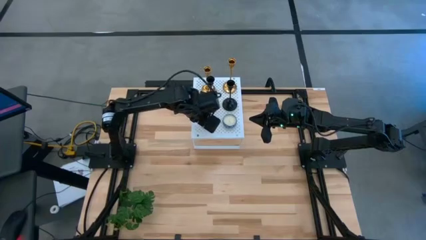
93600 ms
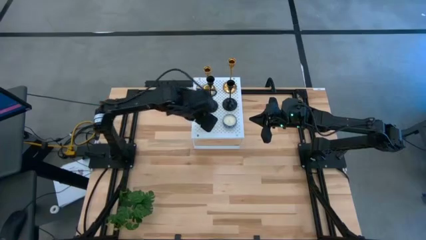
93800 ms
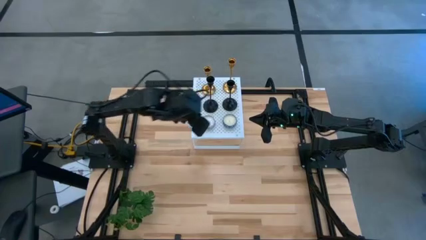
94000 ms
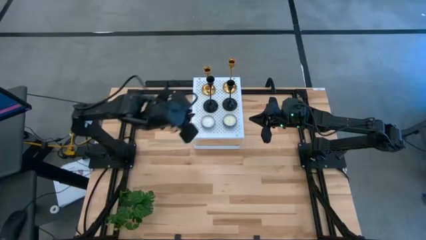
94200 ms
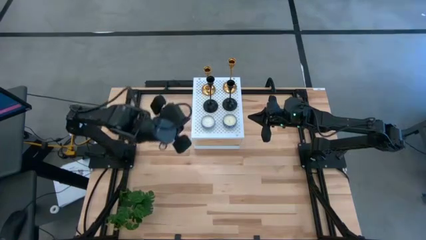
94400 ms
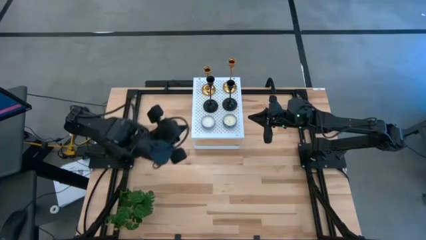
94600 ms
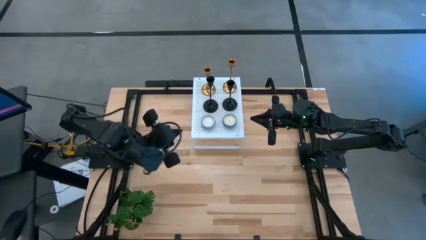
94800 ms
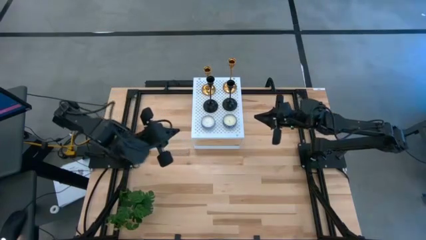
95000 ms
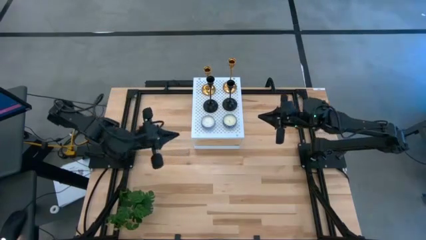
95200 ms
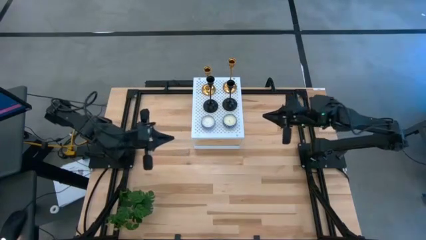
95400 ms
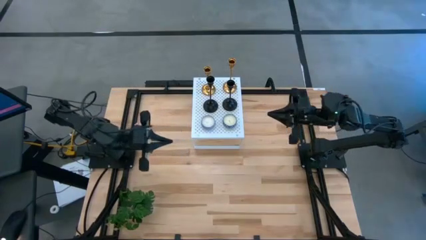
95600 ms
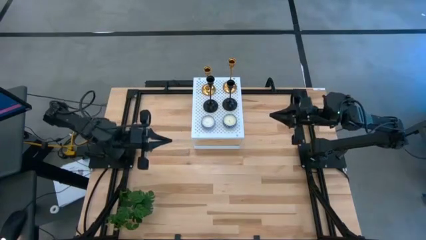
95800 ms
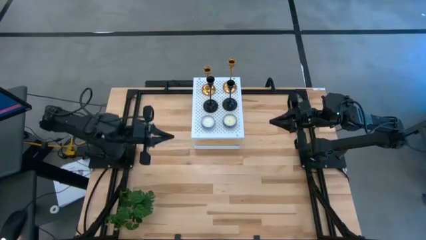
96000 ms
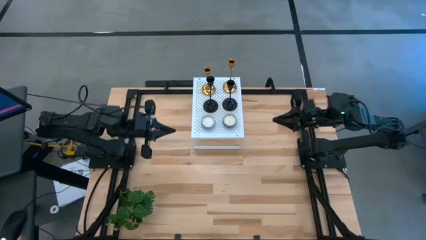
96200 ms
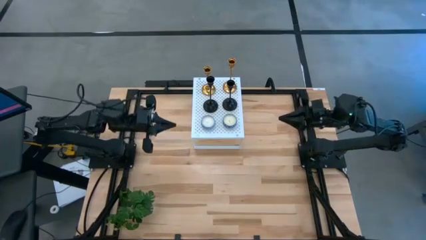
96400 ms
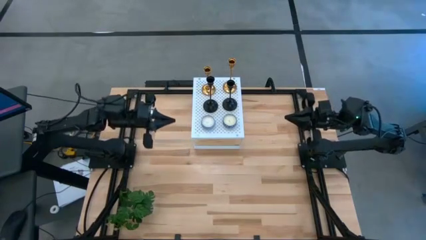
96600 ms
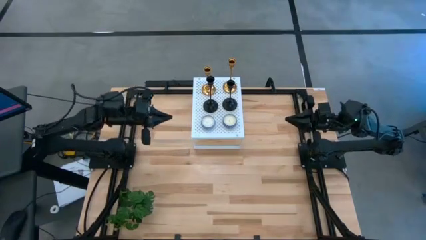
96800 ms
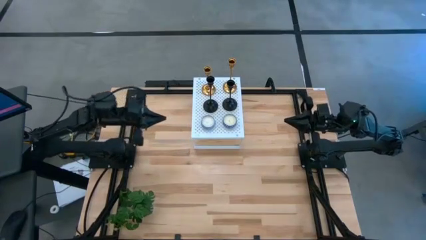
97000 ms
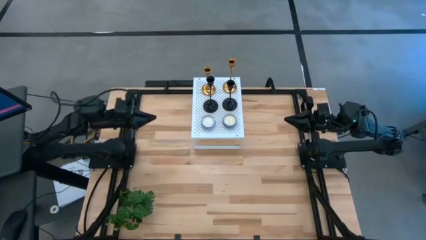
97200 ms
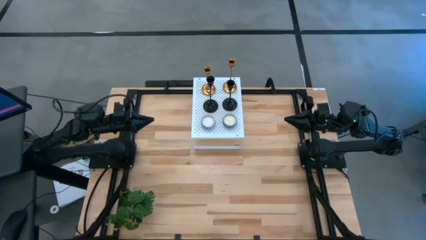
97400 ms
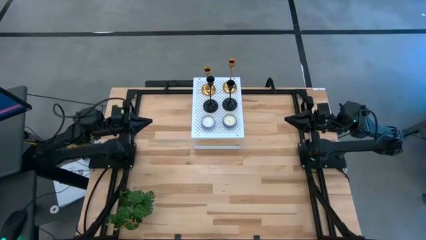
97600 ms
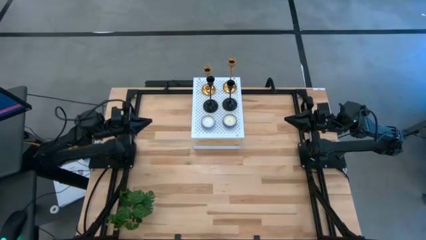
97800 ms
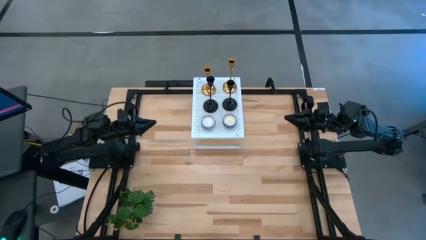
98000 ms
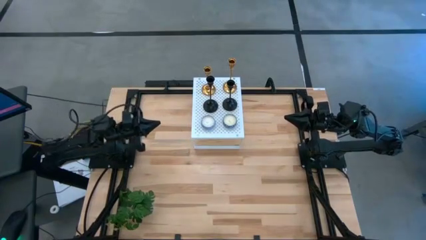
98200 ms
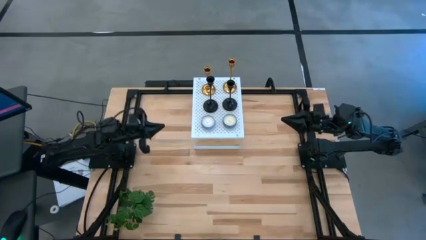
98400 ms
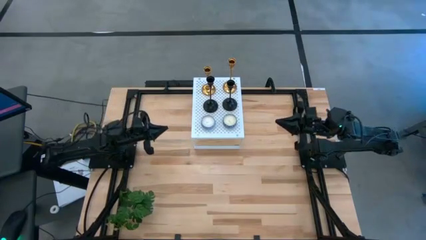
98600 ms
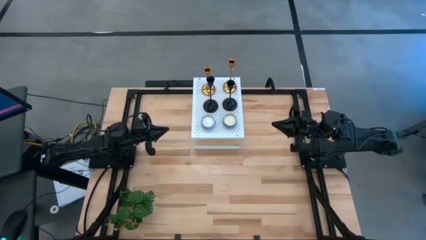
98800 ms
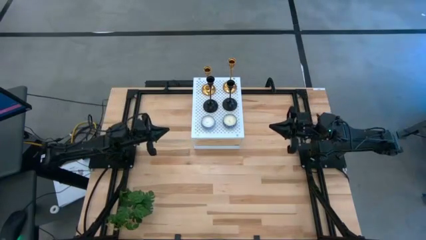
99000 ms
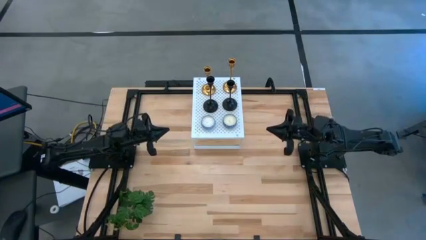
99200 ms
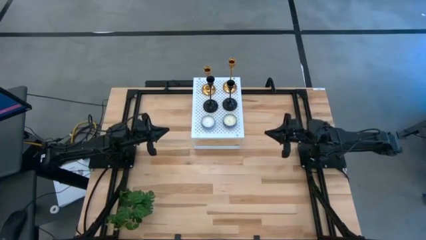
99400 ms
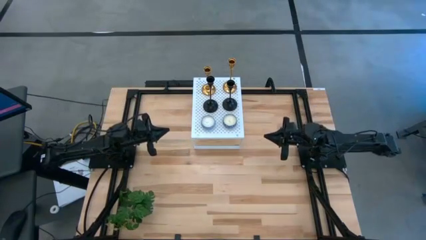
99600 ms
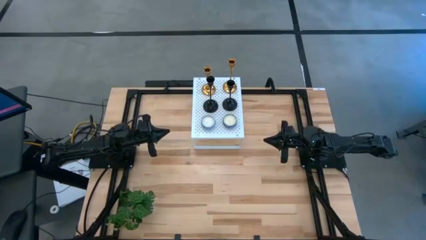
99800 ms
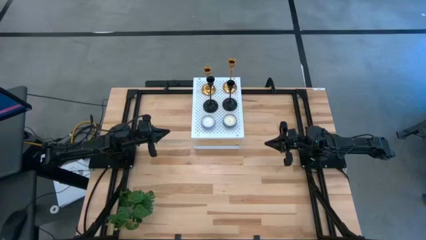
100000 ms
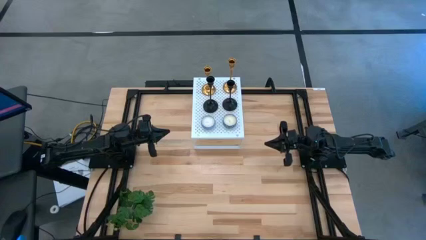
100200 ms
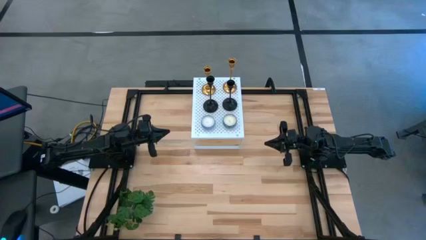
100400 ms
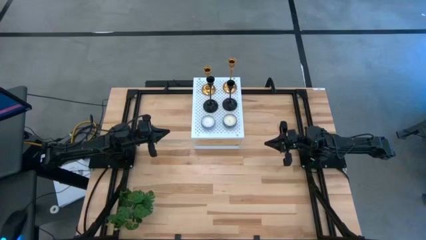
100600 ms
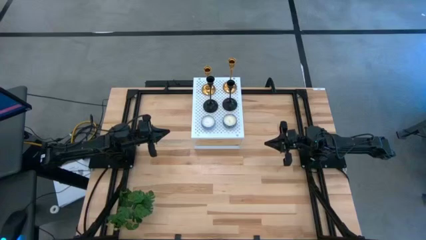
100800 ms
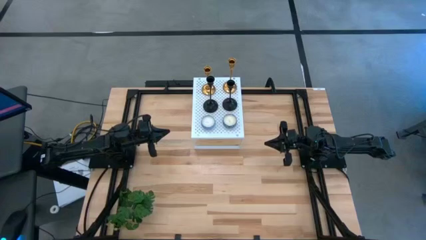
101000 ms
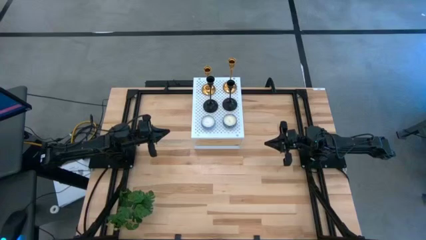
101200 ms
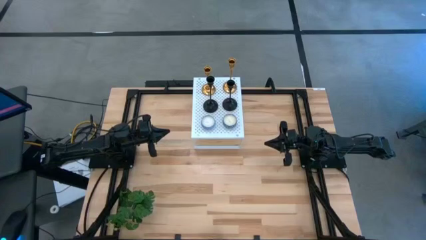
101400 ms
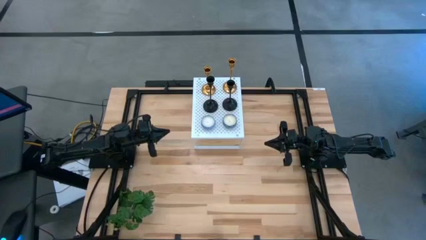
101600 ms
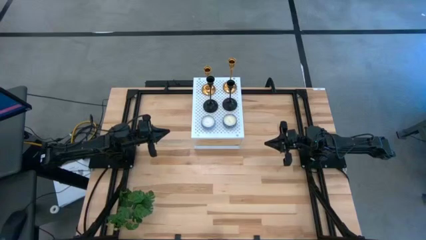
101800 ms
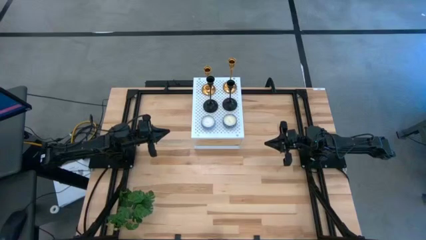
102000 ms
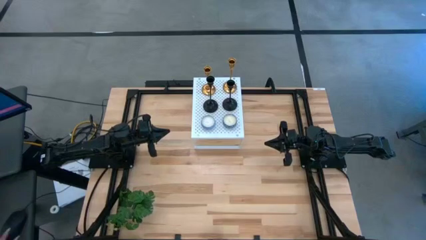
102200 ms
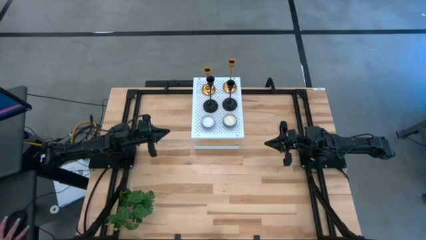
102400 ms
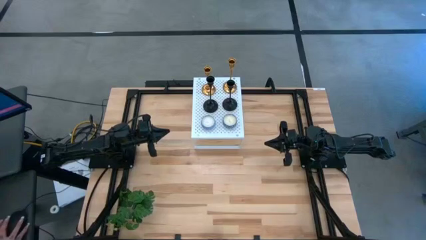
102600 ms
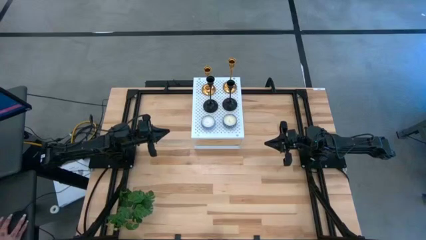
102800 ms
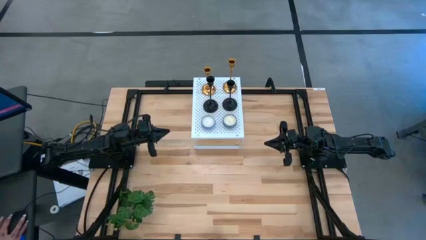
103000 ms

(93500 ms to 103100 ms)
Task: Pick & Place candle stick holders
Return to Home Position

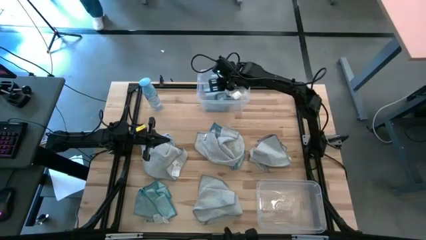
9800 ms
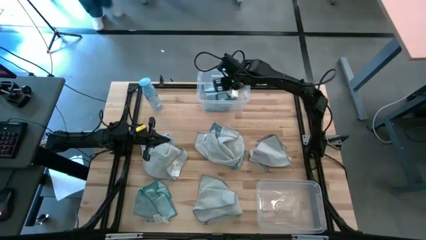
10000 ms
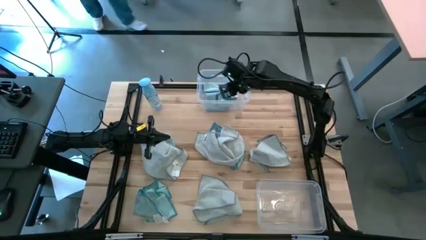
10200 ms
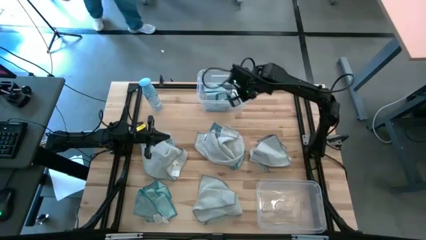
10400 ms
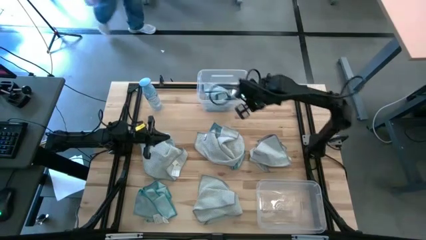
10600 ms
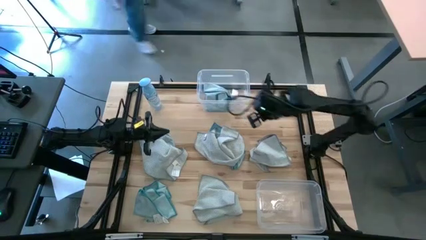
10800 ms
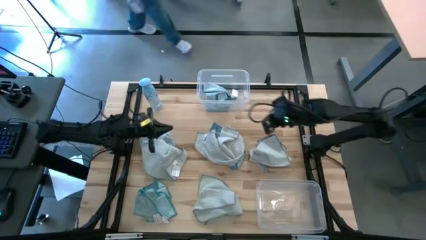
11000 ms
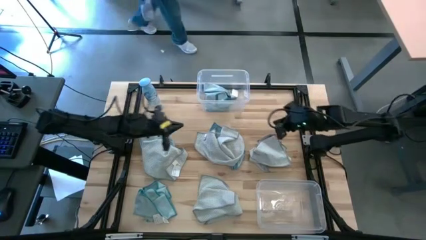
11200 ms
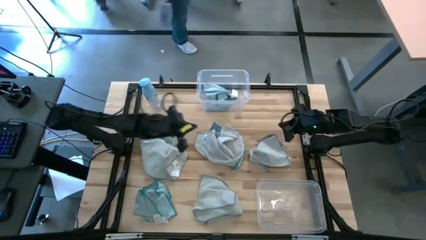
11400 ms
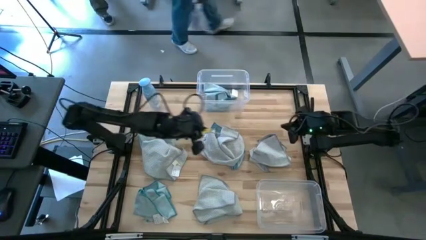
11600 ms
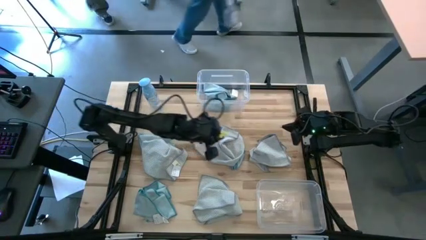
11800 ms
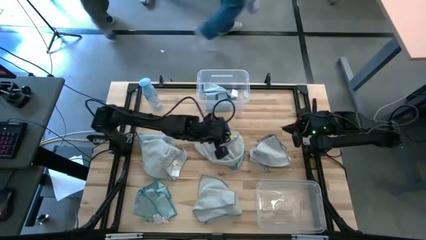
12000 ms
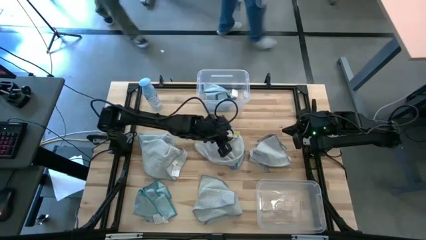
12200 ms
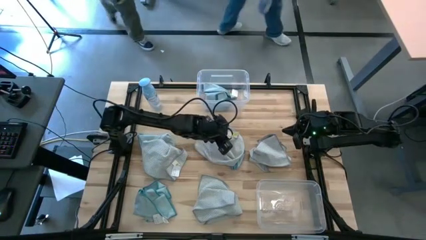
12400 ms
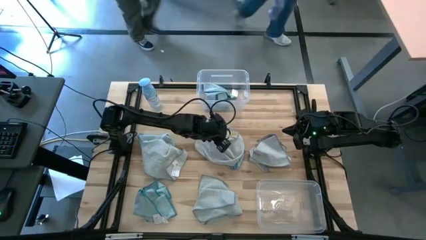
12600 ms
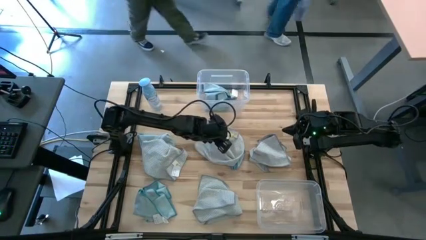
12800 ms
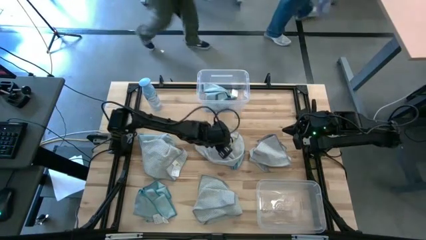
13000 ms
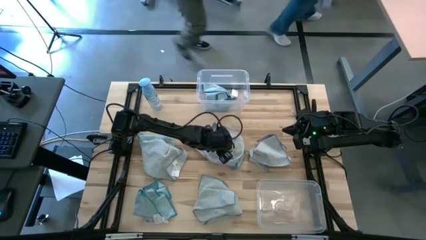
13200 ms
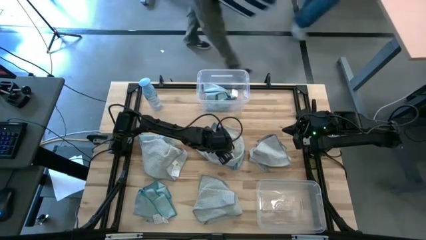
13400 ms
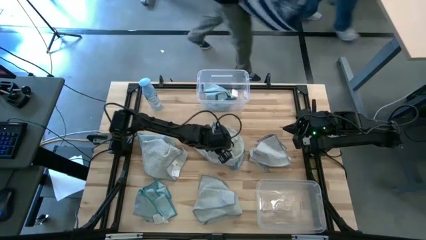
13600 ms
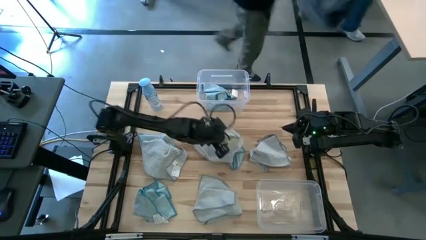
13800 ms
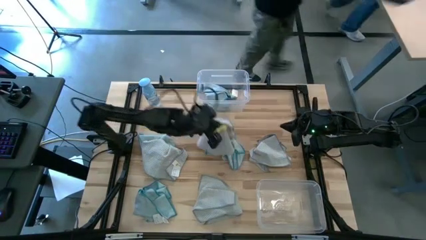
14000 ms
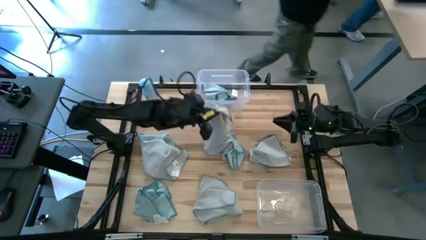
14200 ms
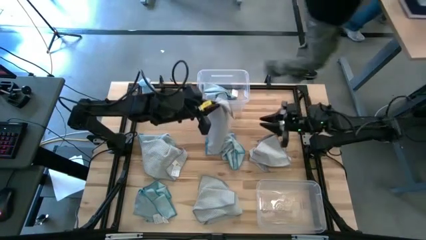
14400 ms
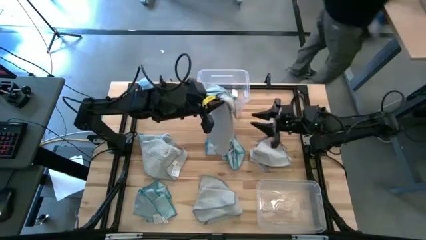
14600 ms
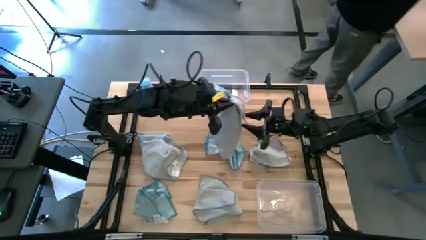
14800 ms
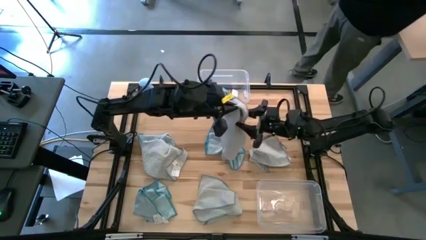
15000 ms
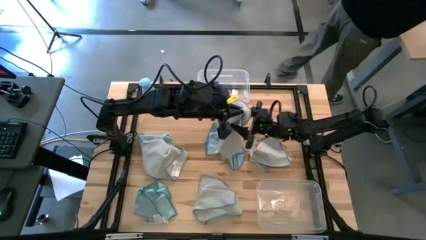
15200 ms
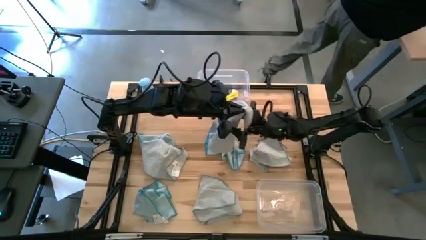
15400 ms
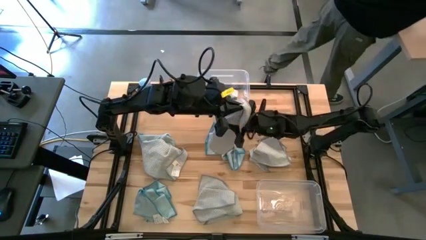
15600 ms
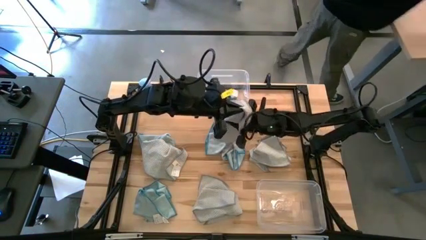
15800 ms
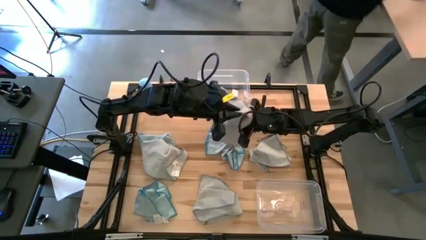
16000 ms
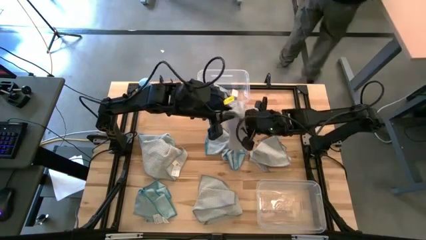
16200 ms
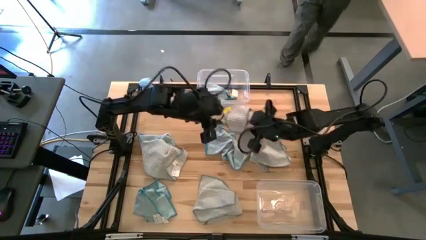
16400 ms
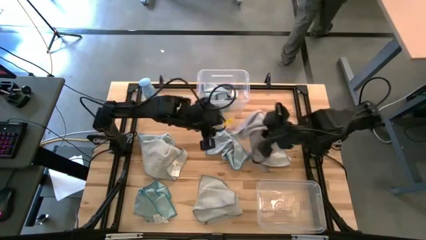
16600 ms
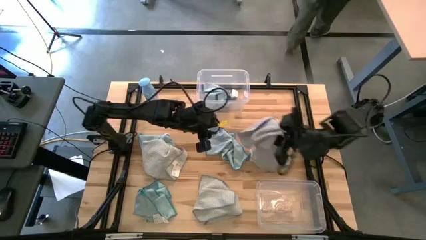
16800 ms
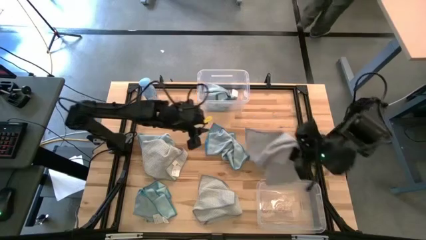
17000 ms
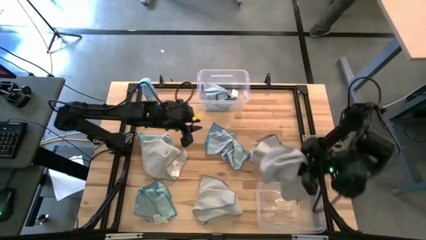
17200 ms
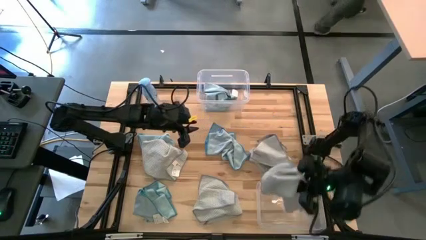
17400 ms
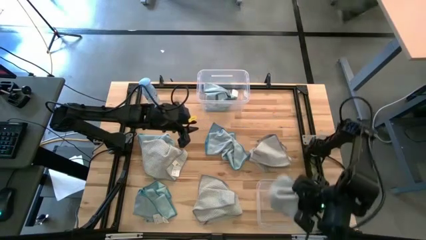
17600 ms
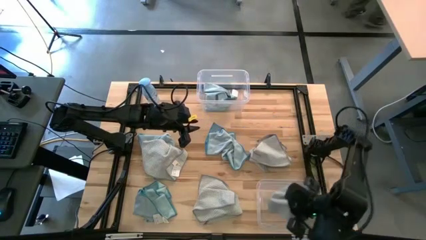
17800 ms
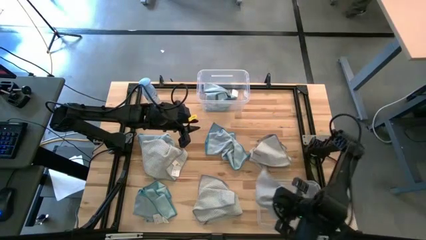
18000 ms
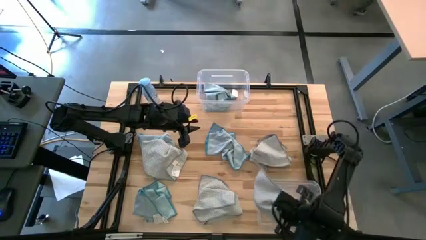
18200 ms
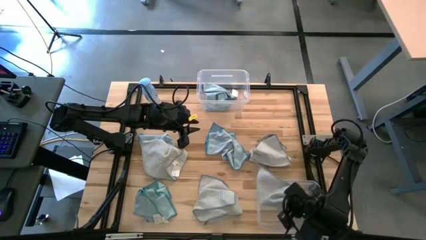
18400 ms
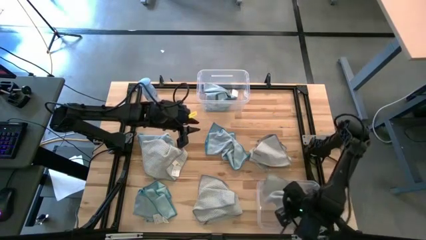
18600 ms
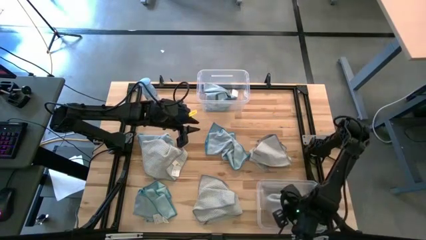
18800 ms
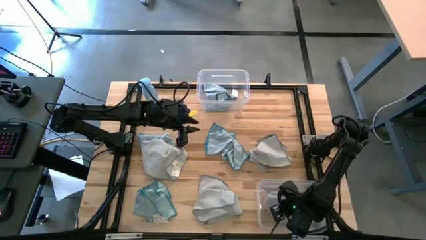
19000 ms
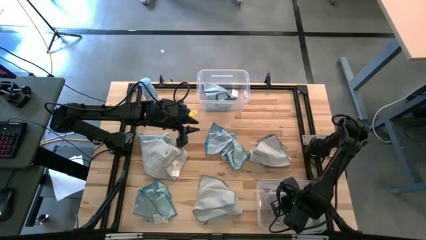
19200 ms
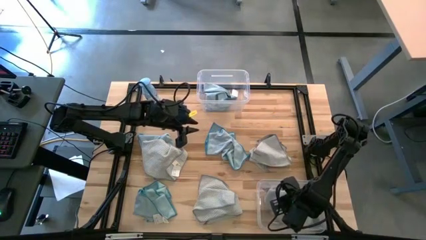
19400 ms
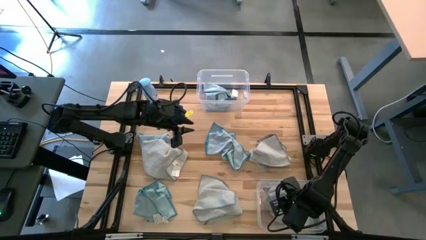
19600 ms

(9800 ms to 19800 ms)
Task: Sort microfiber towel by color & place in baskets
Put the gray towel into the bottom transparent bin
